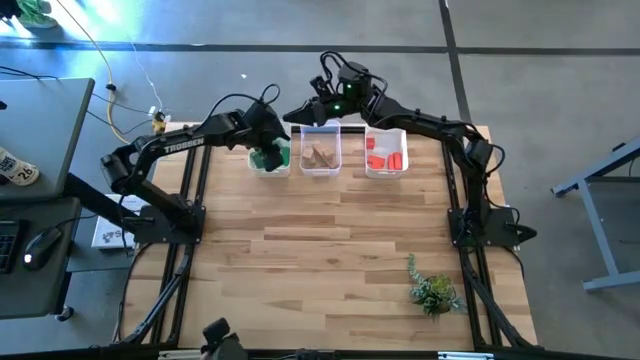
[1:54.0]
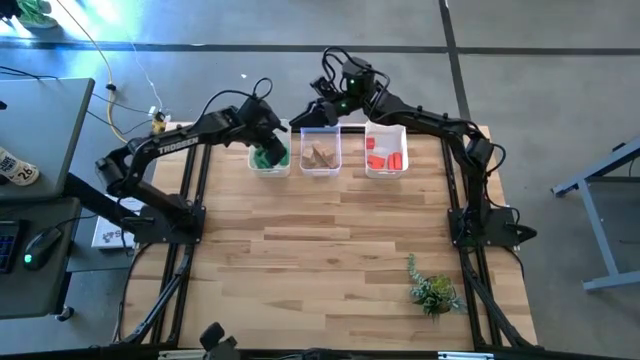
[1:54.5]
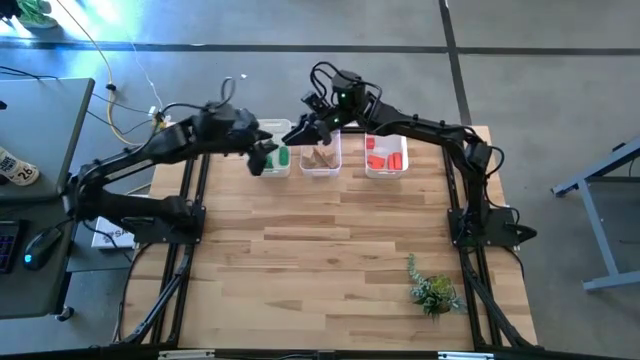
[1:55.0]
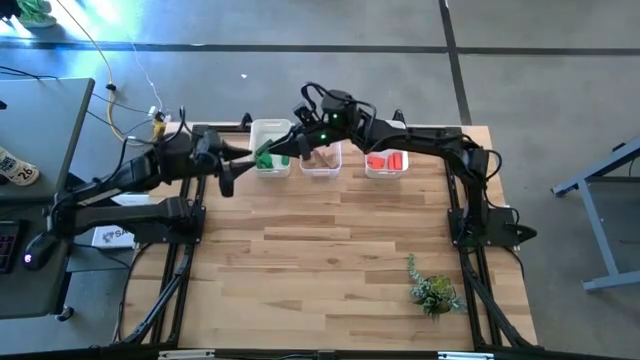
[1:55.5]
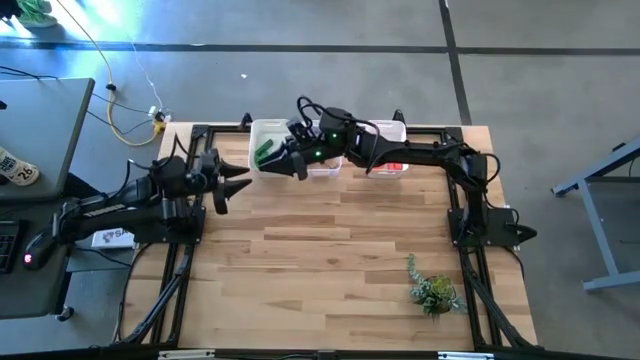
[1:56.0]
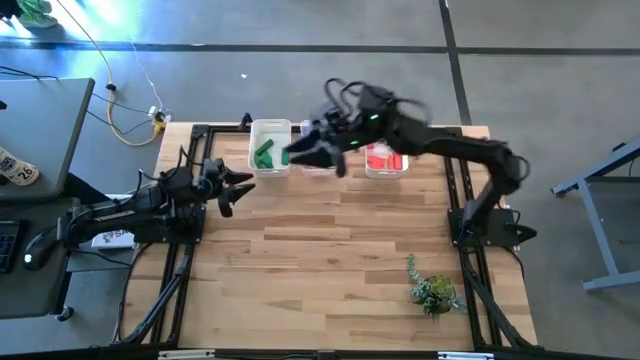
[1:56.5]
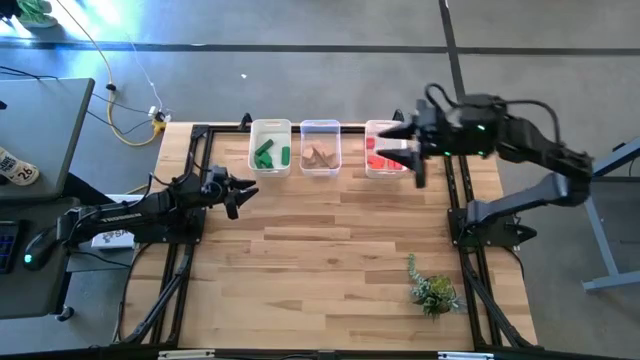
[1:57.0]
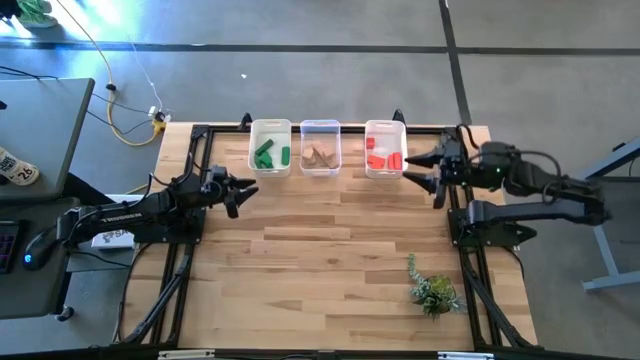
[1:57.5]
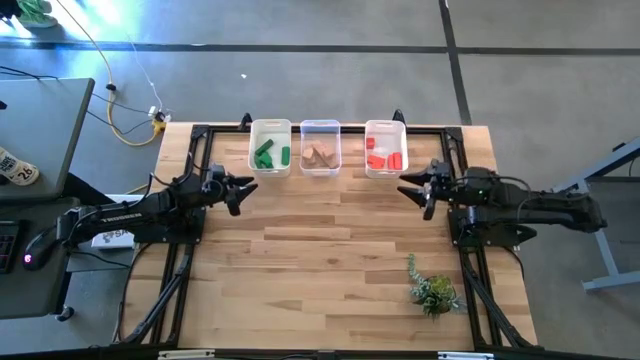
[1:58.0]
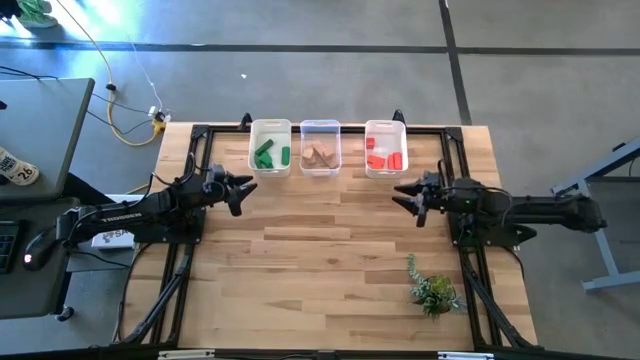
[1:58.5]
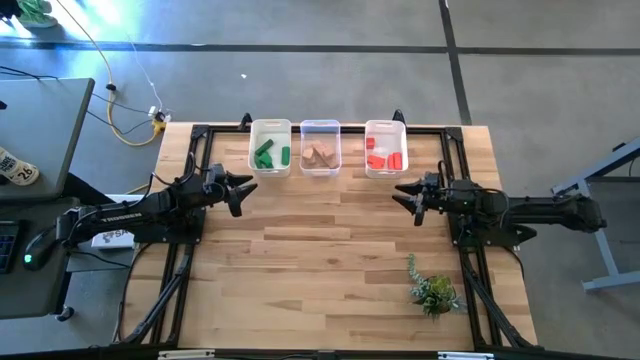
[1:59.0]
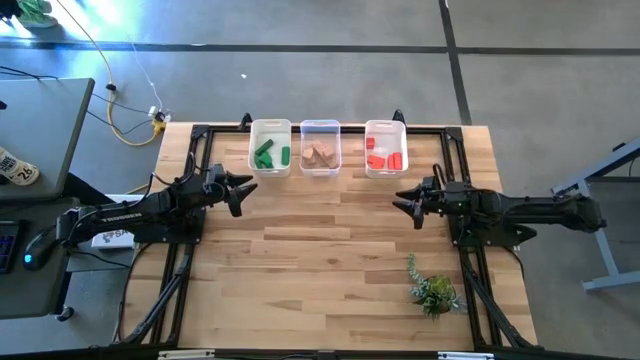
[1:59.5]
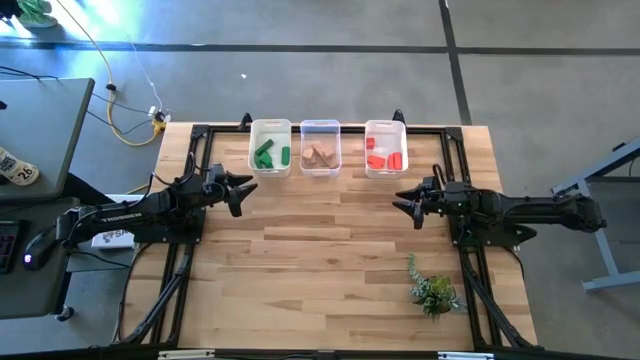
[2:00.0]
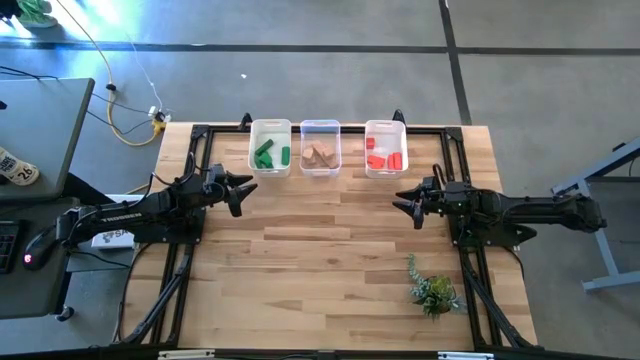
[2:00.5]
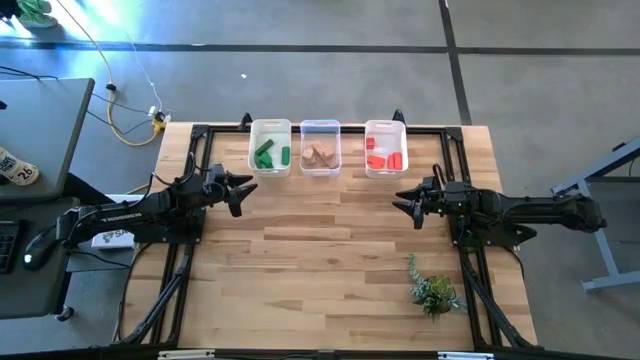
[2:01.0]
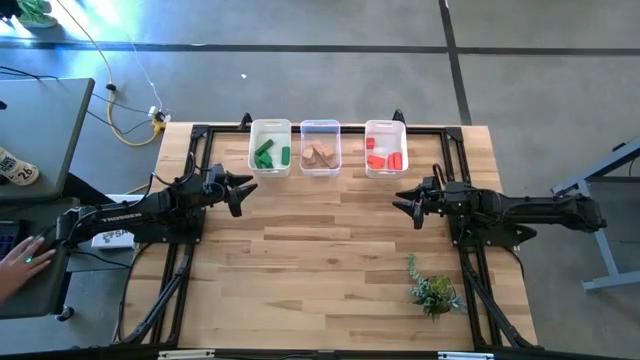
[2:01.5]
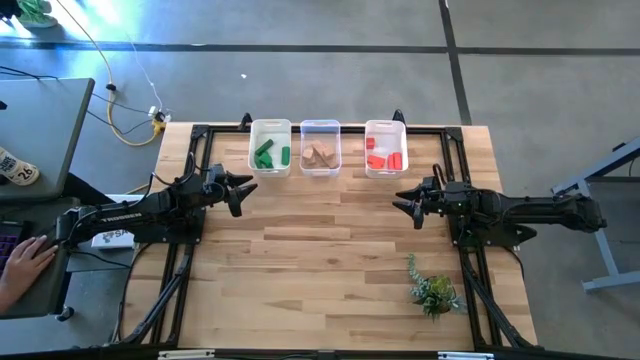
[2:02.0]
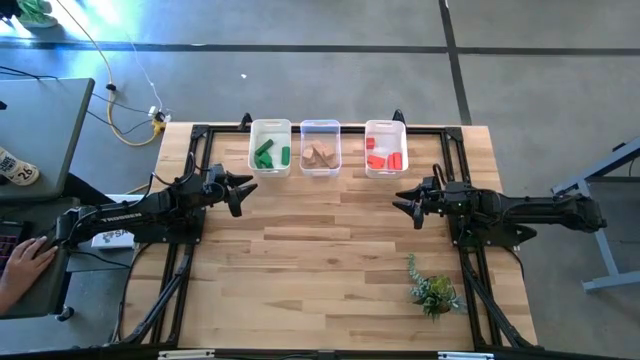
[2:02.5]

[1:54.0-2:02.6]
Task: Sort & place blocks by color
Return to Home Position

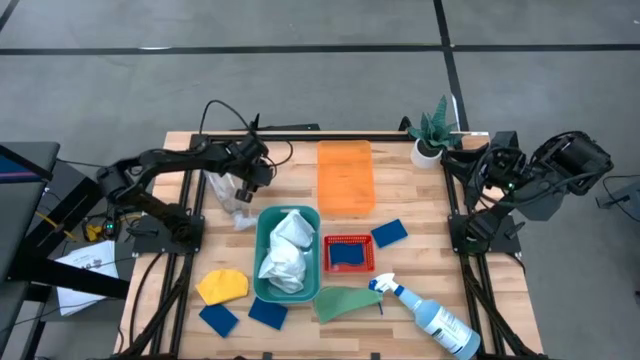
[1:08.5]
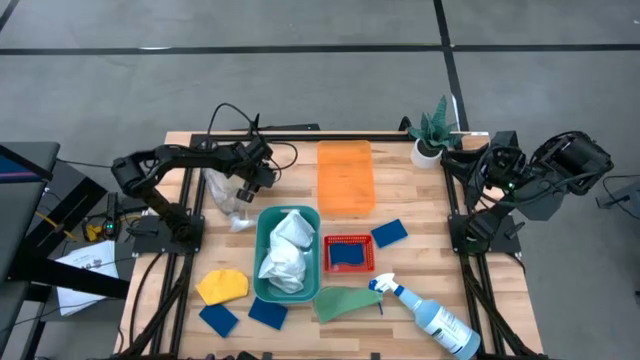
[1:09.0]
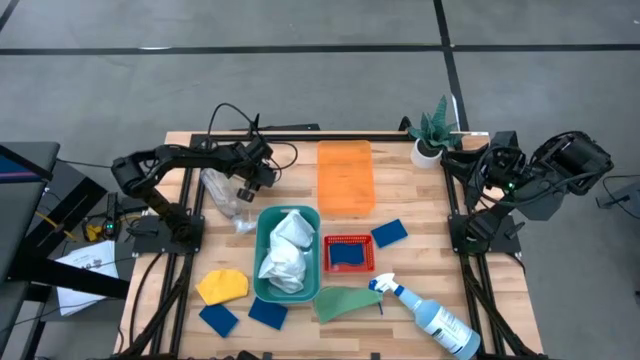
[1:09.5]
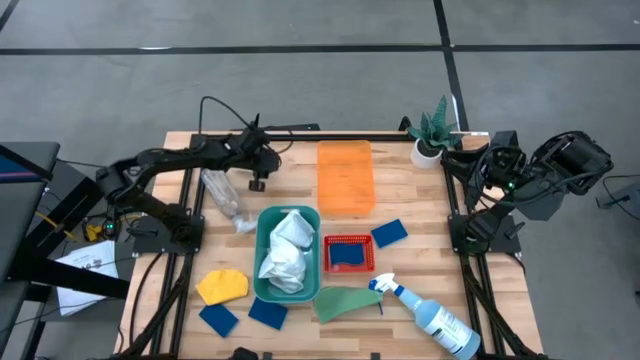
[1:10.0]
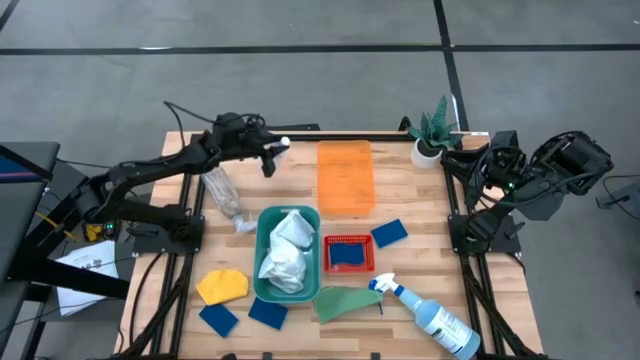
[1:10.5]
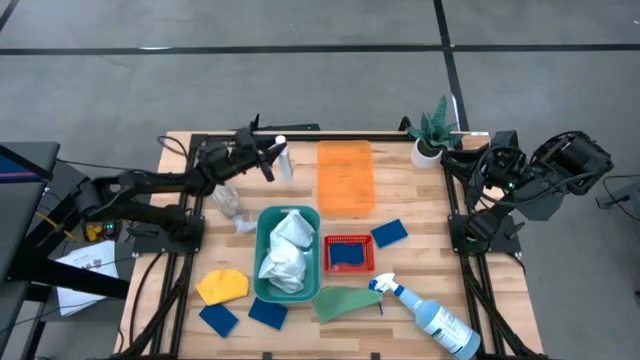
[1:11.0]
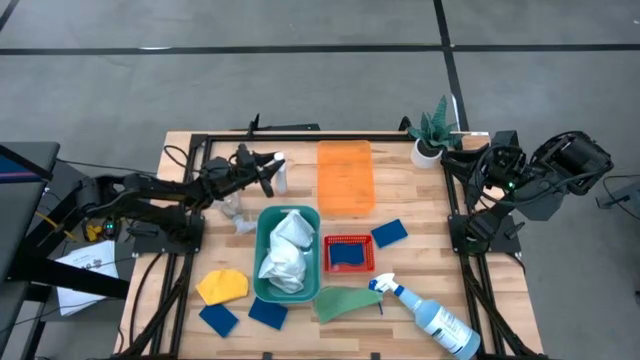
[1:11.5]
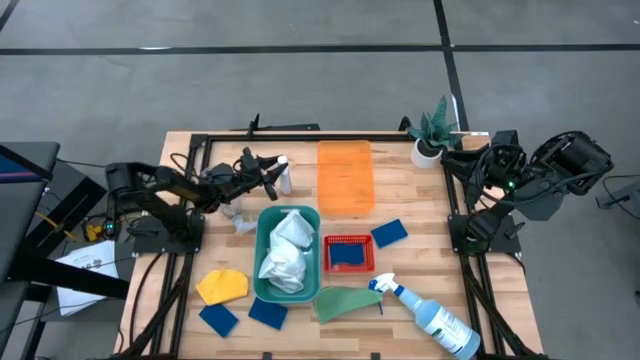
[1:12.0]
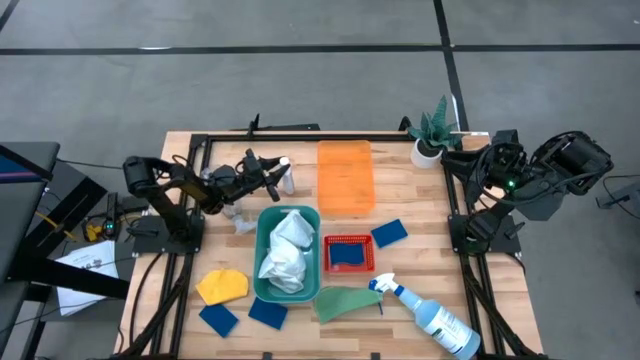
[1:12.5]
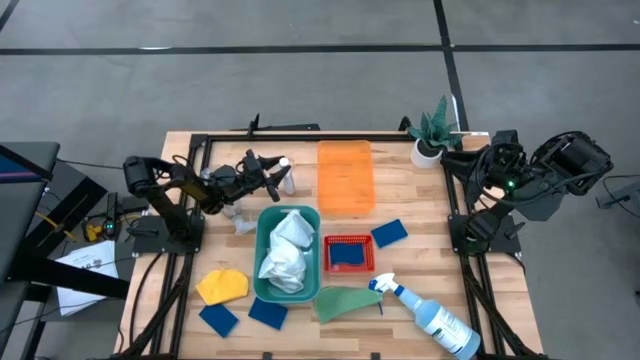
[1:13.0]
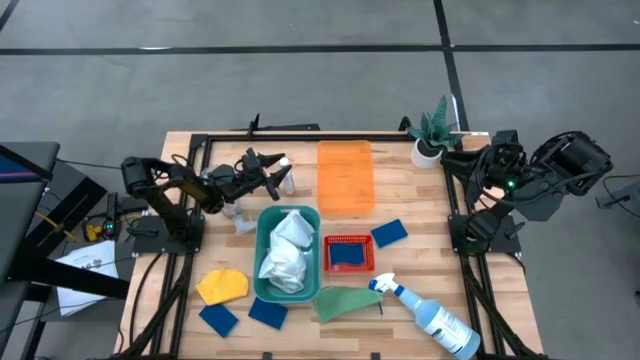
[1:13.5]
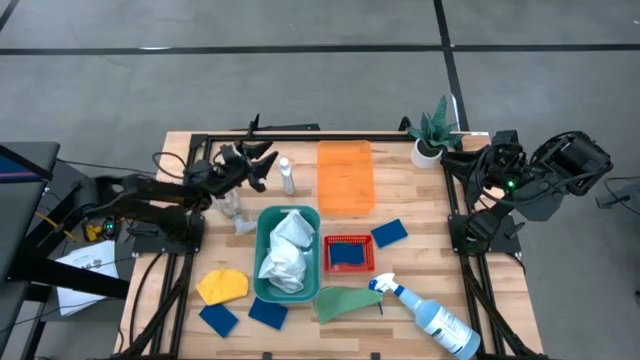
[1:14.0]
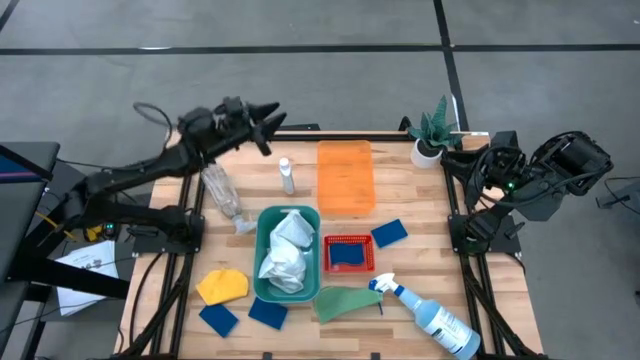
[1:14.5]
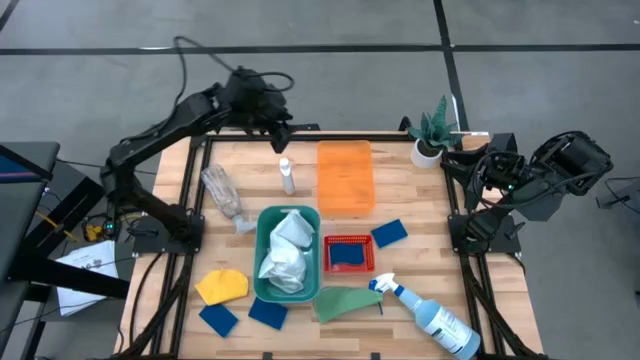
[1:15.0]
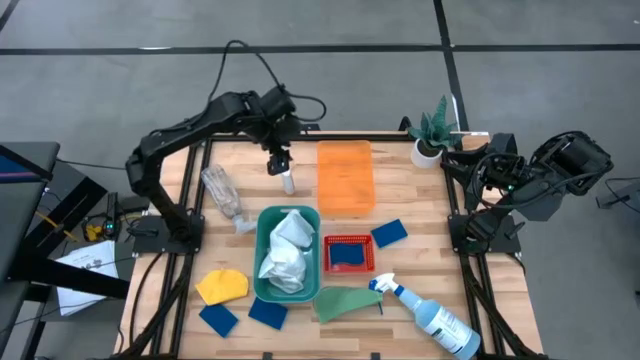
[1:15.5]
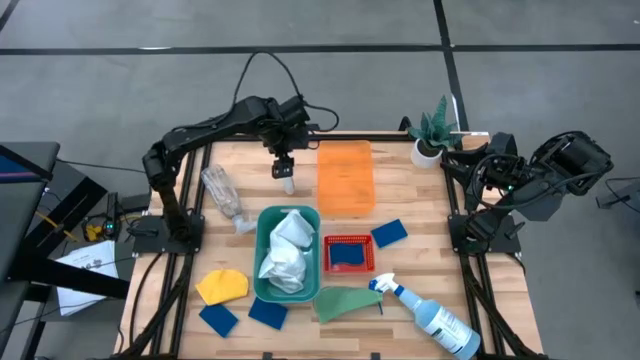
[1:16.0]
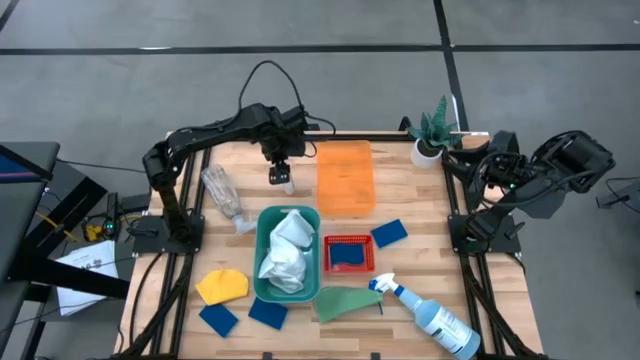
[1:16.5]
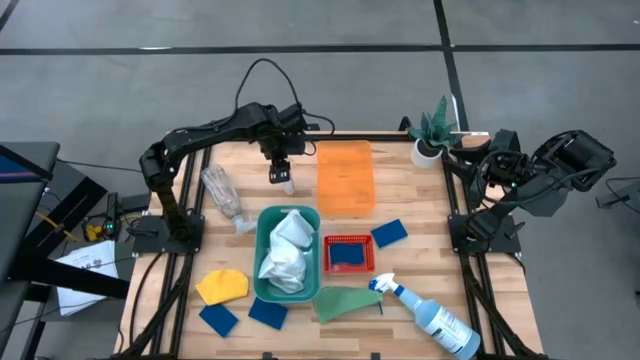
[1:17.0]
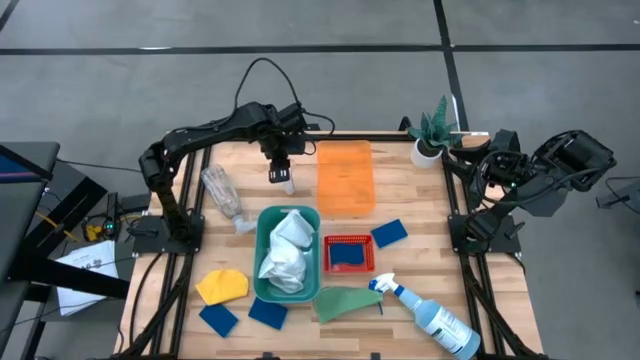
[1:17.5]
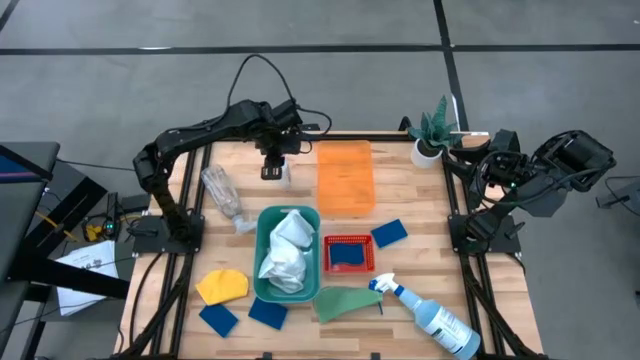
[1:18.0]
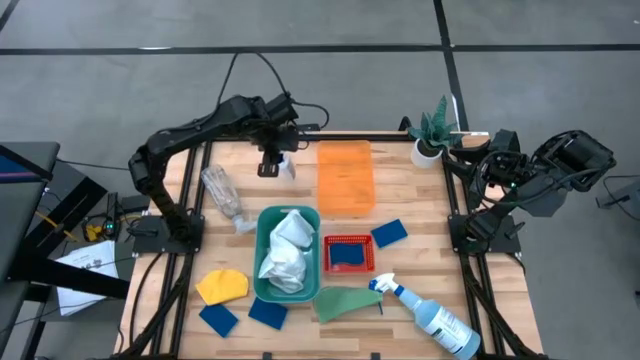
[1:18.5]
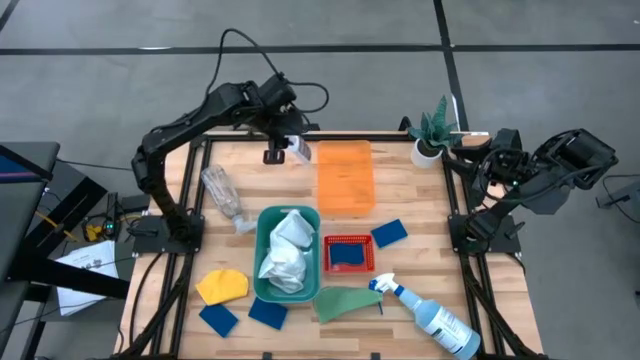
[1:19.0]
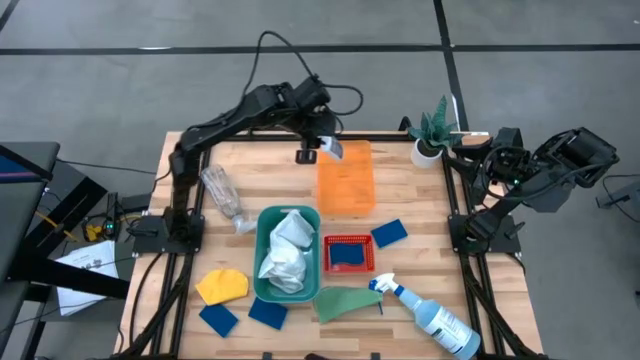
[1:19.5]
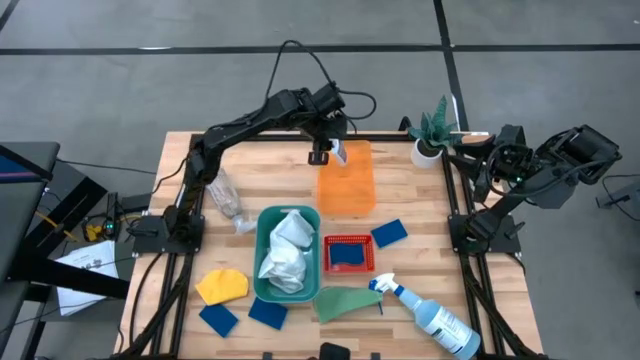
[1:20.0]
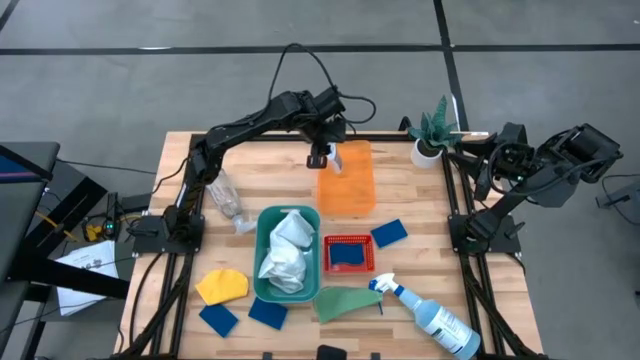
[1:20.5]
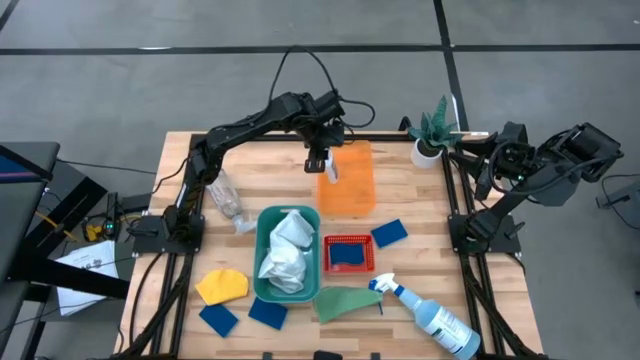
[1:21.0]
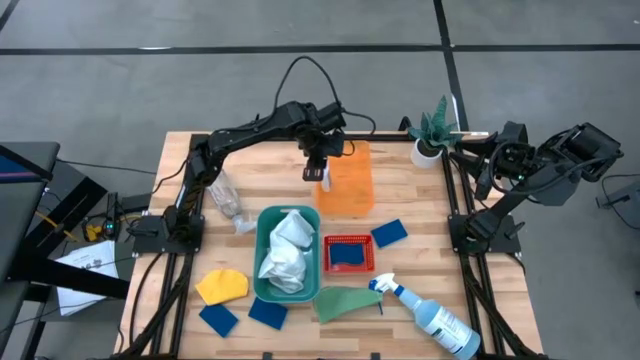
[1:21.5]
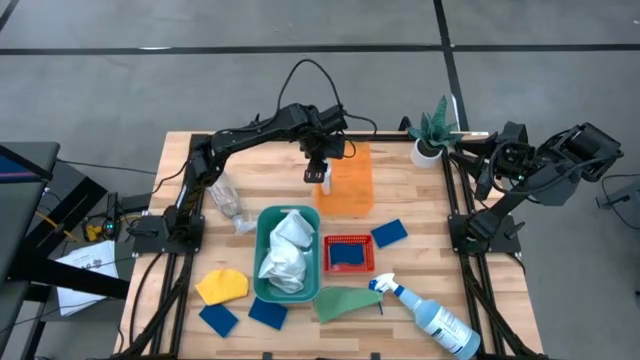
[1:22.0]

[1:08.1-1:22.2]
Task: Pick & Place Kitchen Items
Put the white plastic restorer bottle into the orange bin
